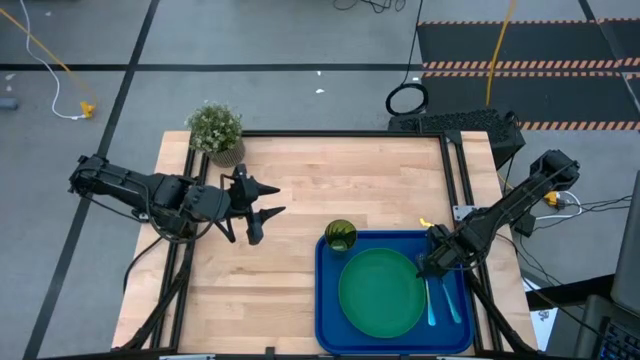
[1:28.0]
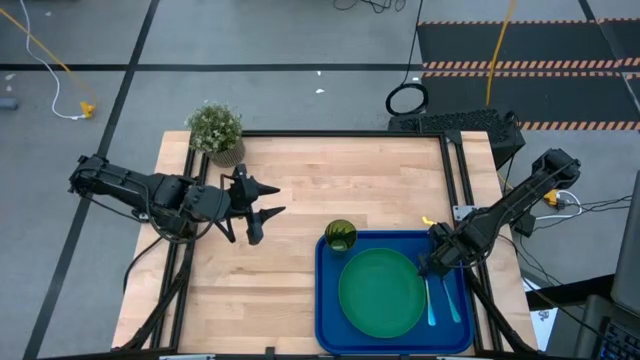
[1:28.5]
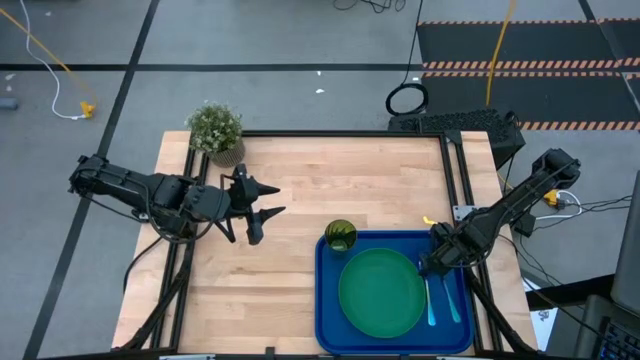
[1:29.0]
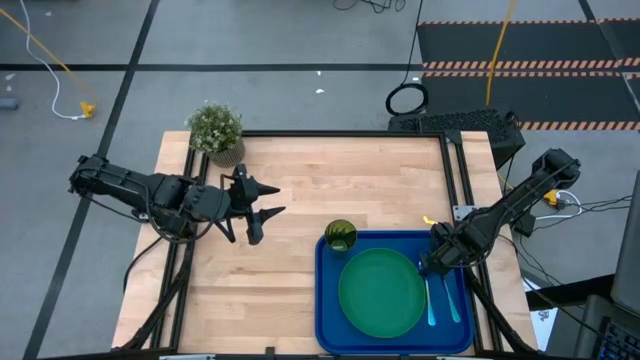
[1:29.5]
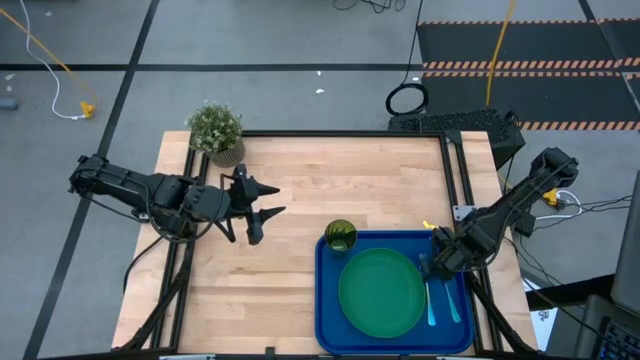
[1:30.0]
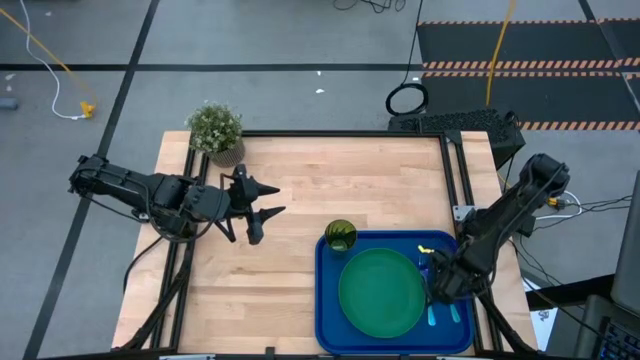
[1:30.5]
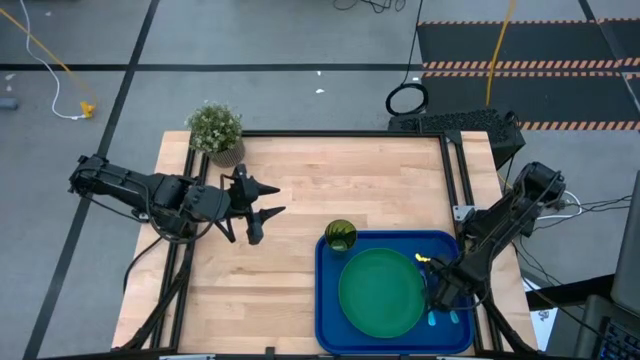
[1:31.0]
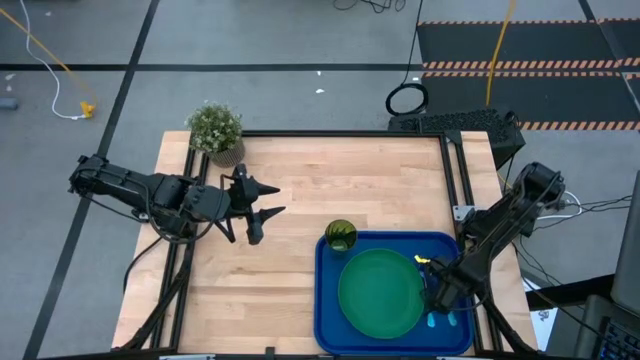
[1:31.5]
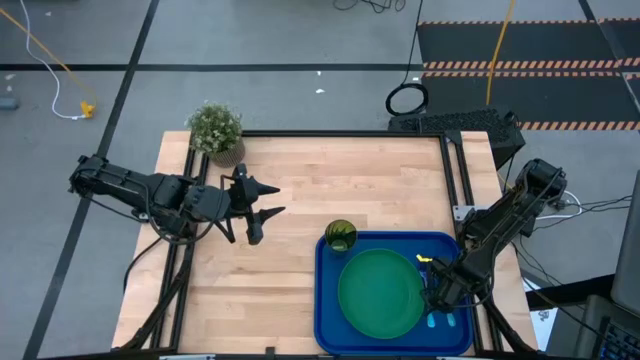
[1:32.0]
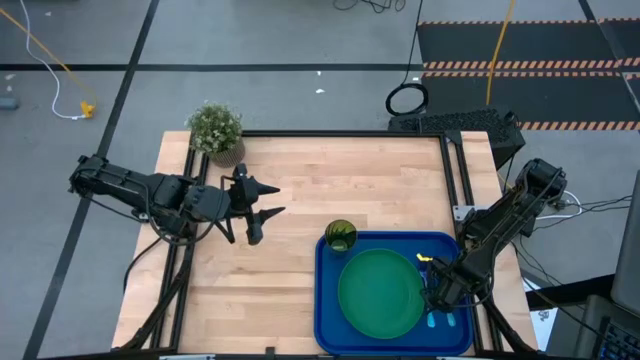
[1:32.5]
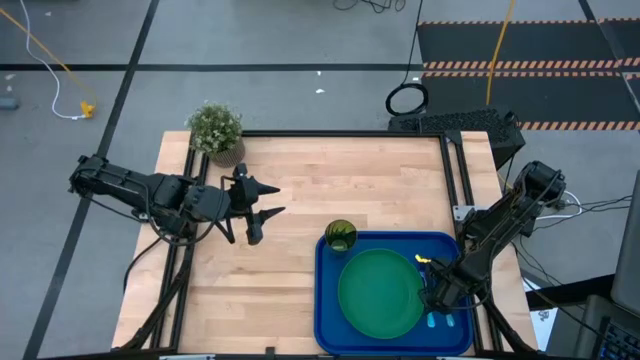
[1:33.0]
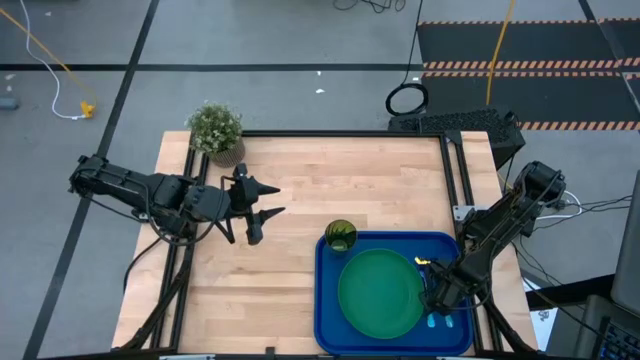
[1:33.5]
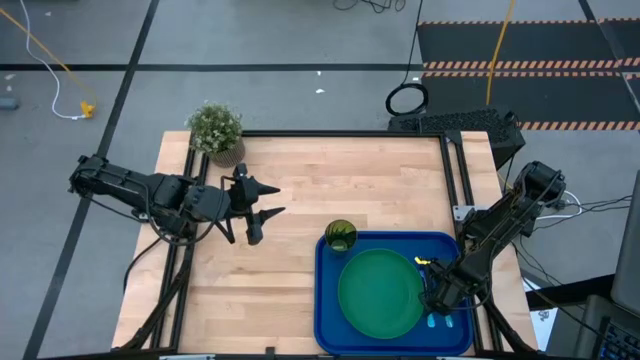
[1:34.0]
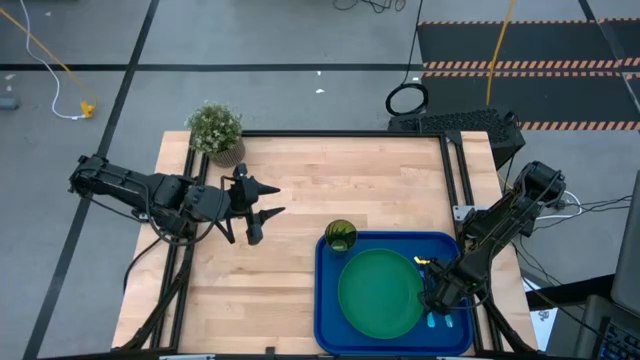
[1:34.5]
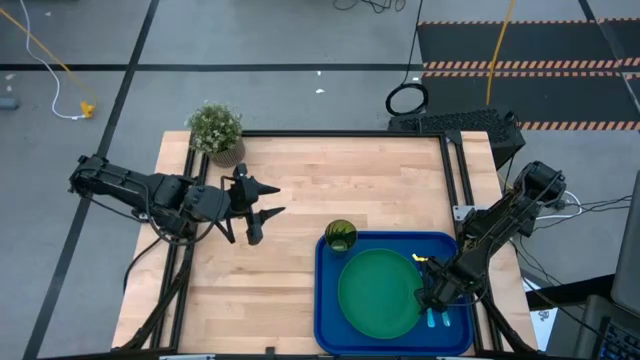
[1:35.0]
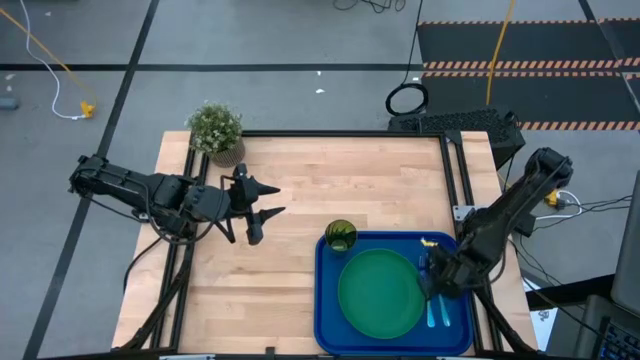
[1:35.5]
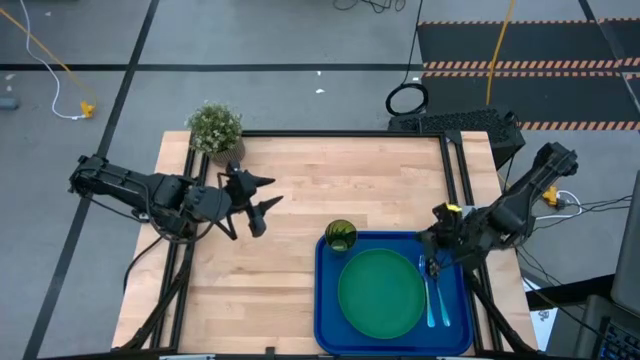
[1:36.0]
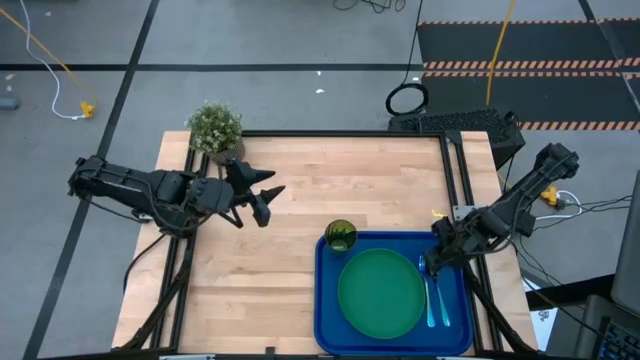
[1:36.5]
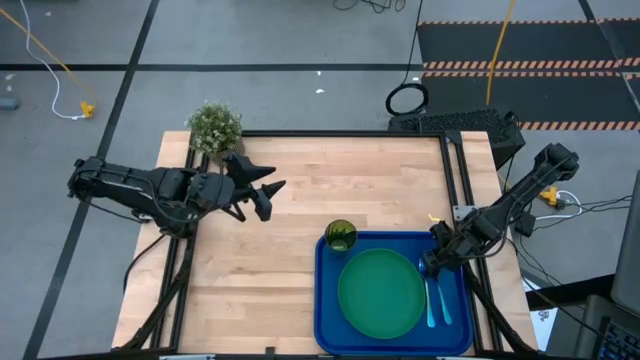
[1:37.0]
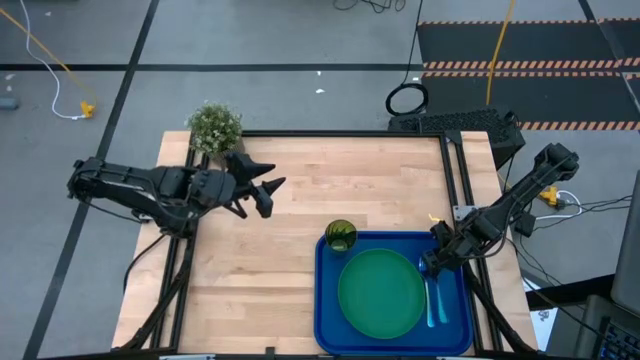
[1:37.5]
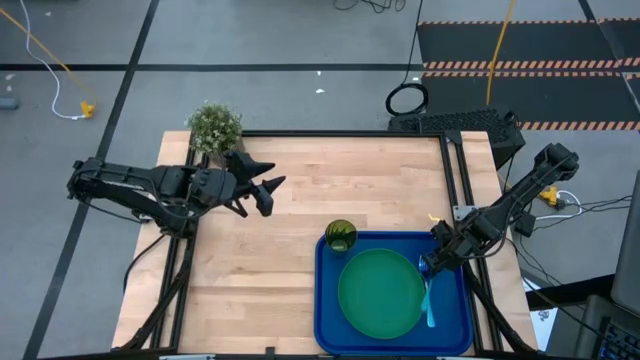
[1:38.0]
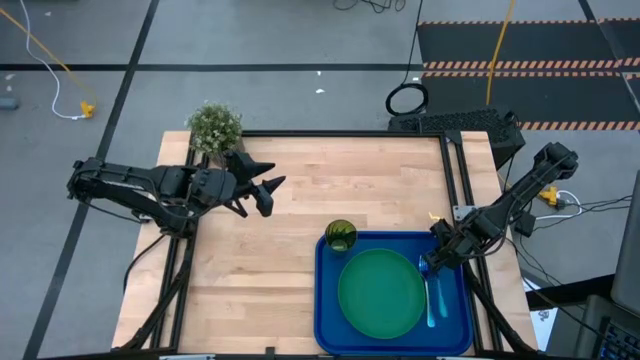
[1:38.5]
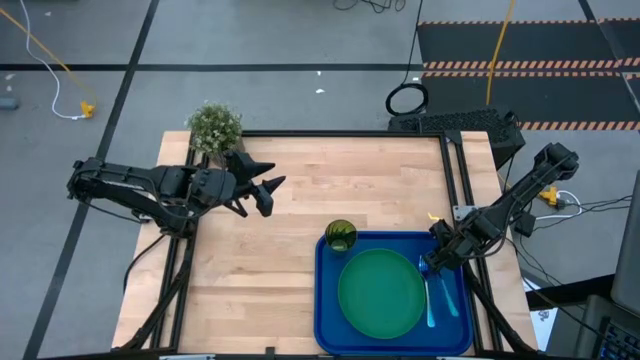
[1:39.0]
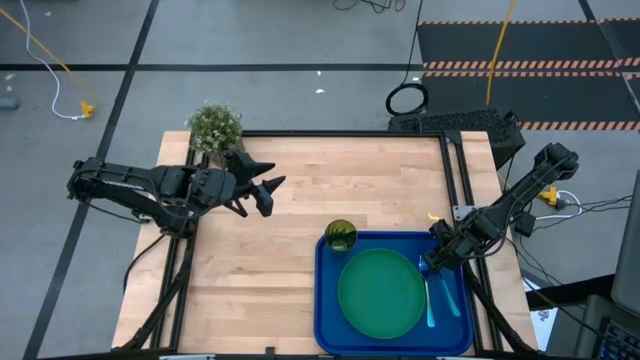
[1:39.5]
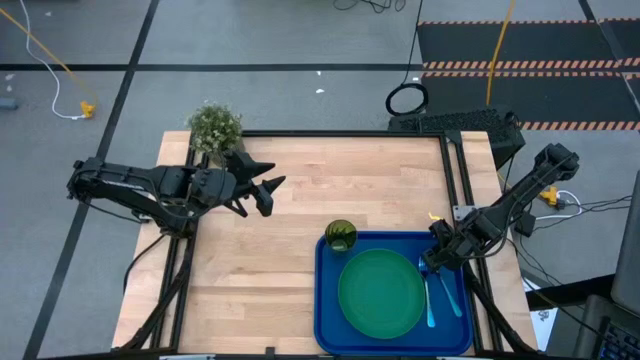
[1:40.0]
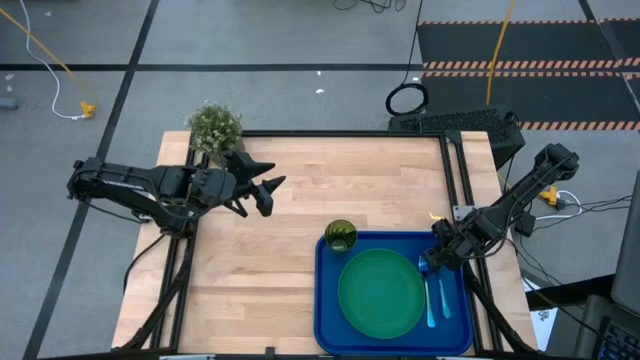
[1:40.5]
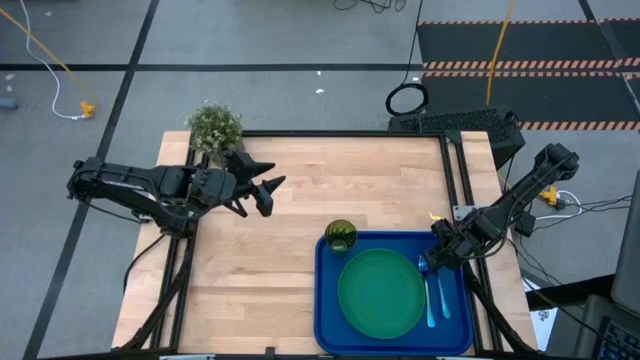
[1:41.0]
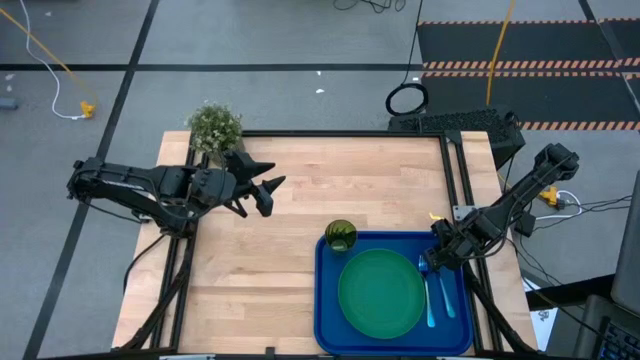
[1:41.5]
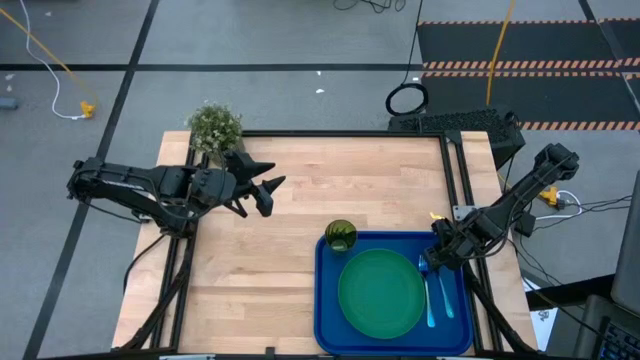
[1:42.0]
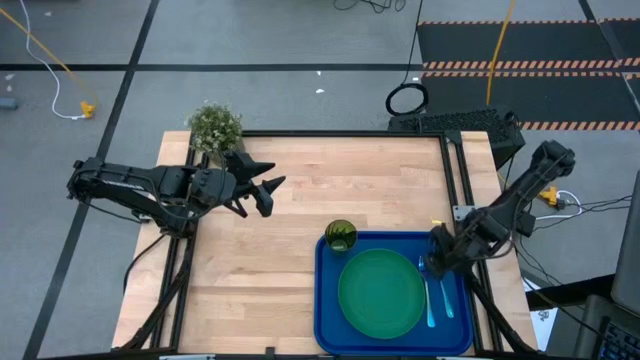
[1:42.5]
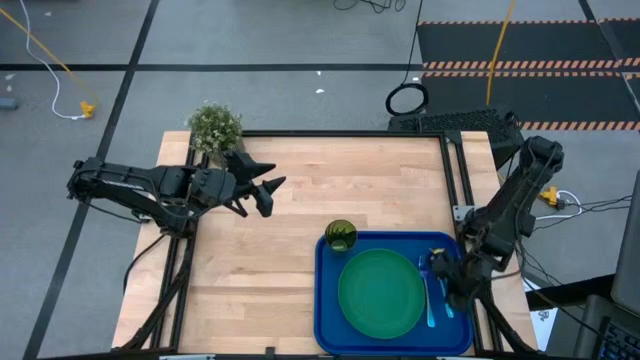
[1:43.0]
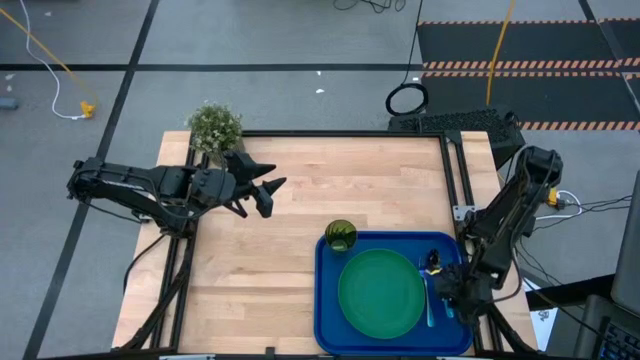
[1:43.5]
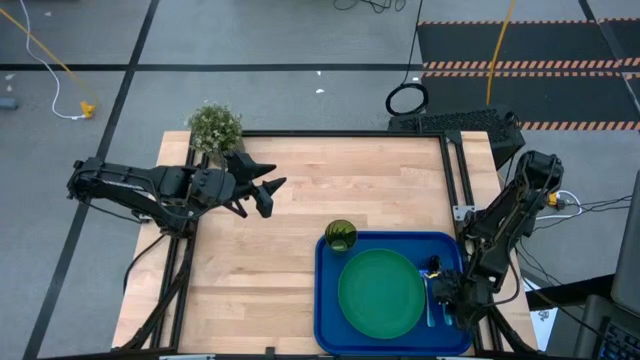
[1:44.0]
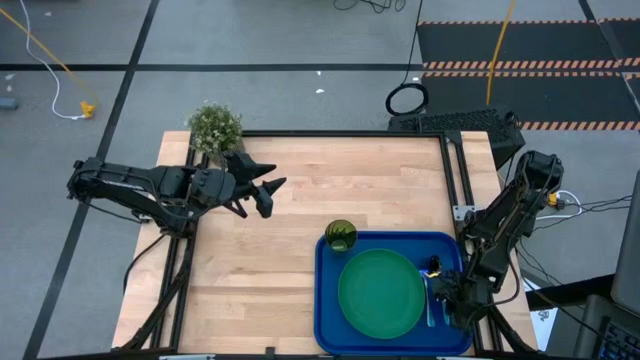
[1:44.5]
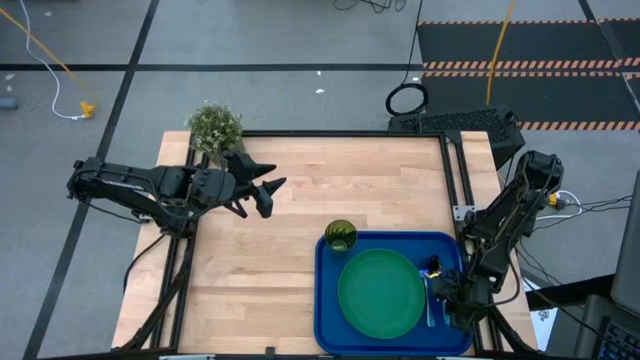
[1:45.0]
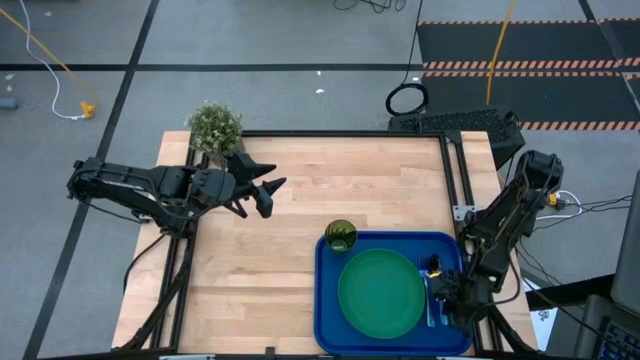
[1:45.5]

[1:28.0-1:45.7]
Task: Pick and place plate/cup/fork/spoon on tray
Put the blue spoon on the blue tray to the right of the blue fork

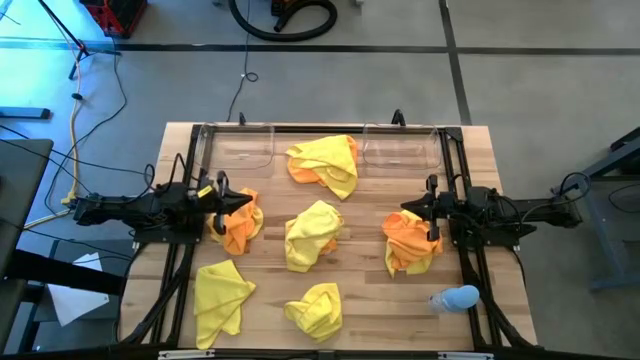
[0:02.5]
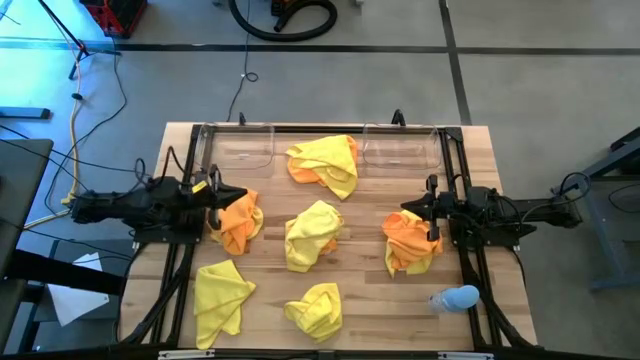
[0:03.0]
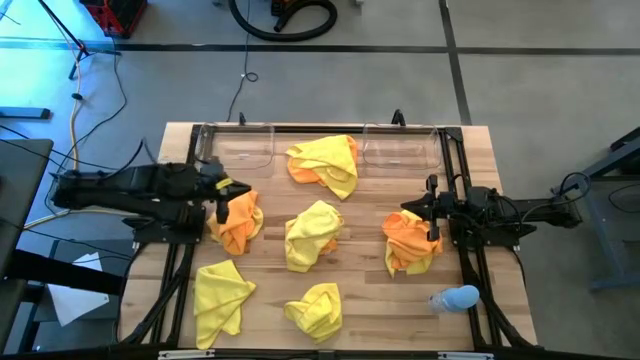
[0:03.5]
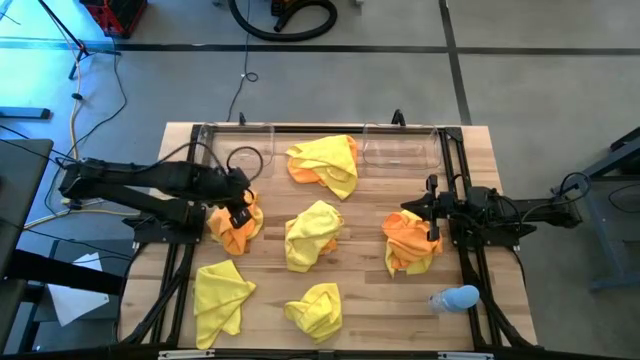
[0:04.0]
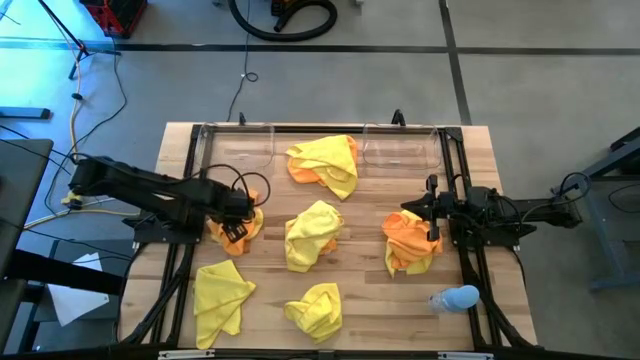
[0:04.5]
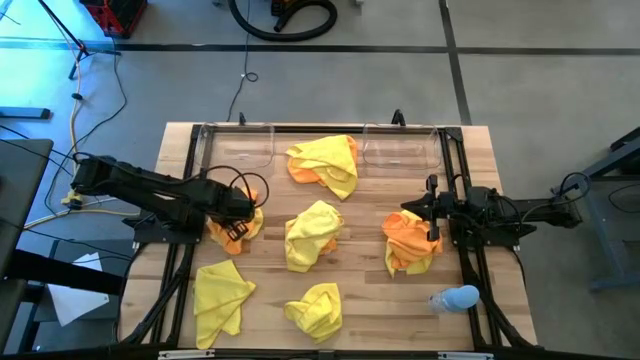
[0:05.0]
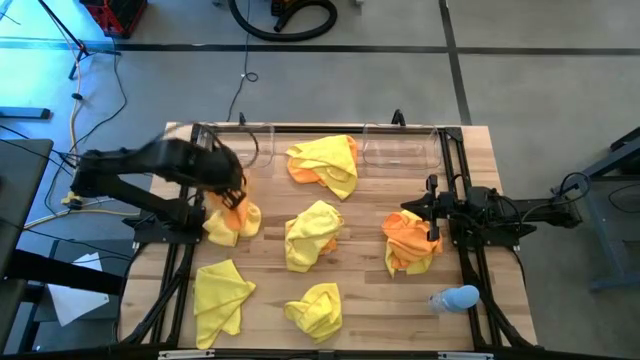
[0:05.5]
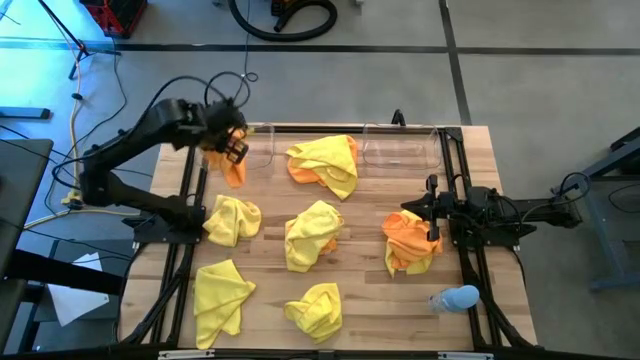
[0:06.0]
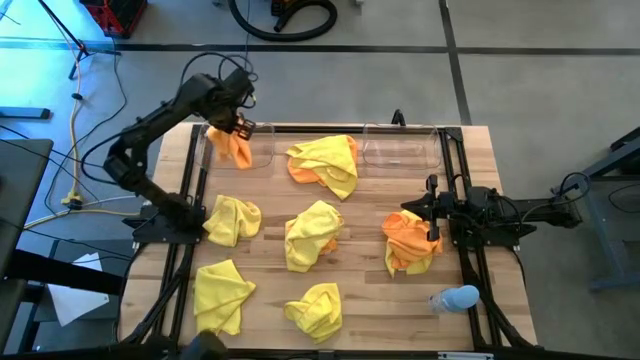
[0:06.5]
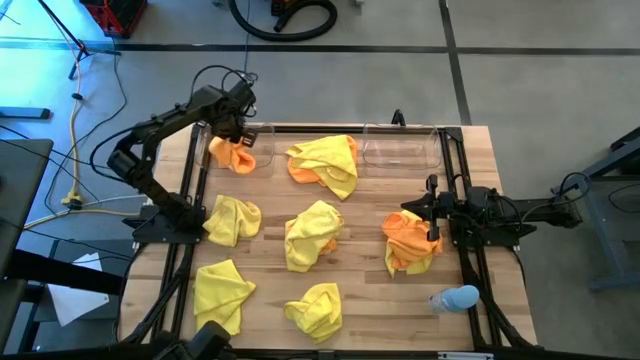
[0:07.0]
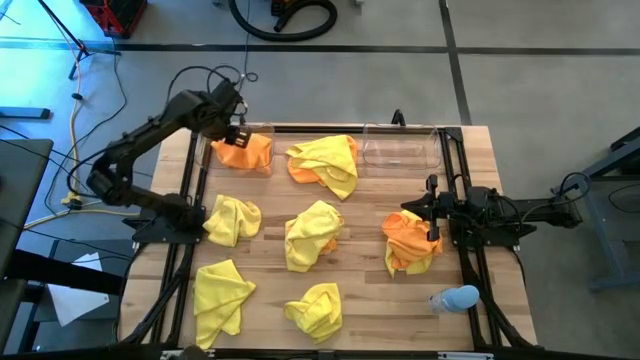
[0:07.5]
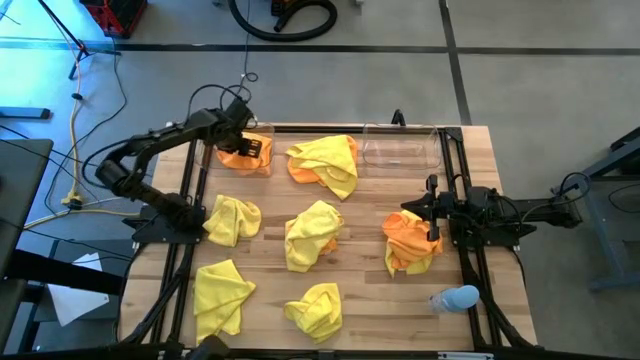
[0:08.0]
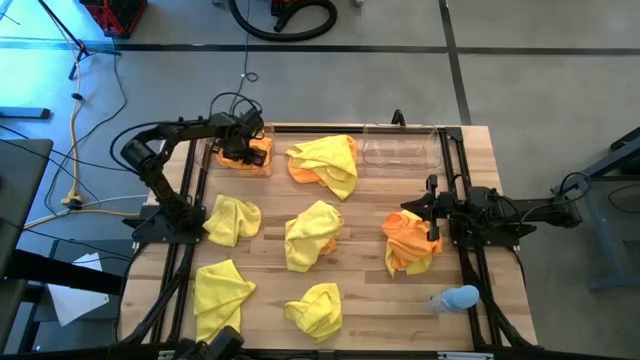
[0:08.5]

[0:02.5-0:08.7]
Task: Sort microfiber towel by color & place in baskets
Put the bottom left orange microfiber cloth into the left transparent bin
